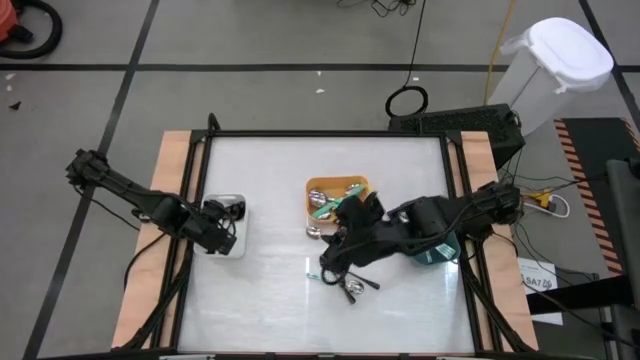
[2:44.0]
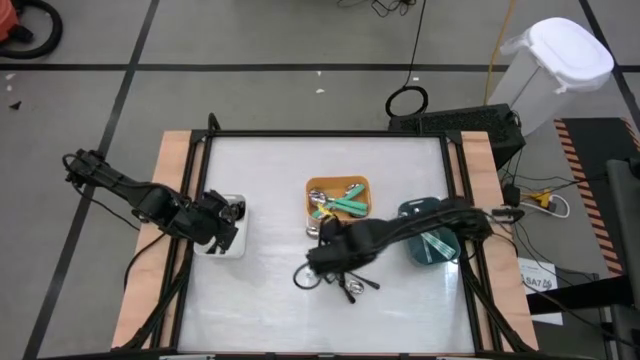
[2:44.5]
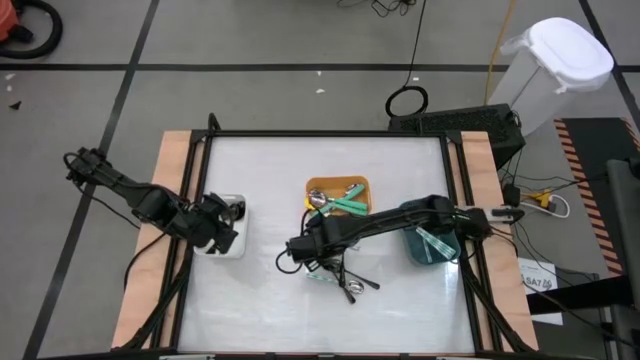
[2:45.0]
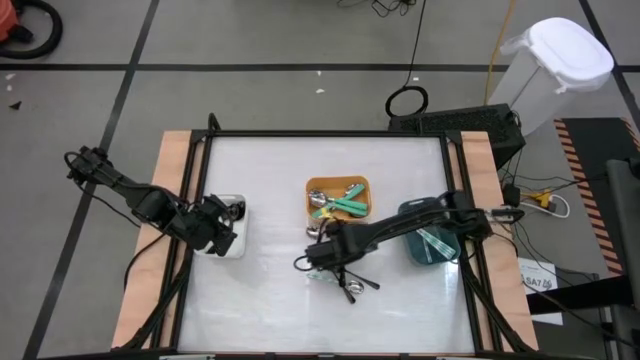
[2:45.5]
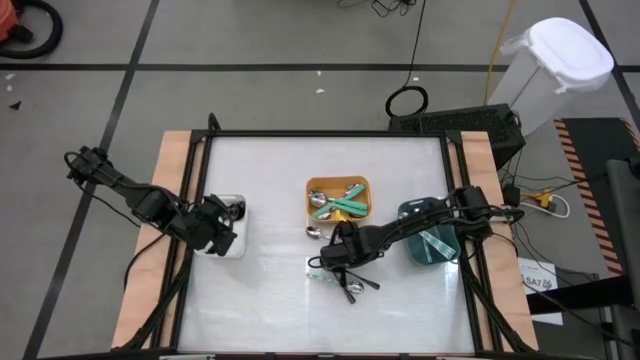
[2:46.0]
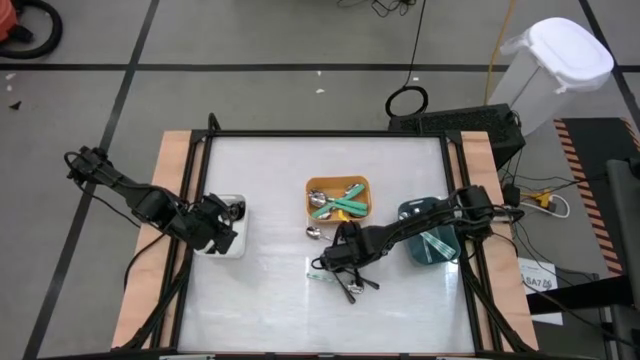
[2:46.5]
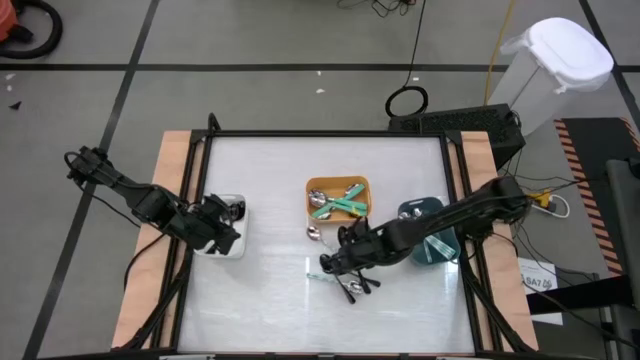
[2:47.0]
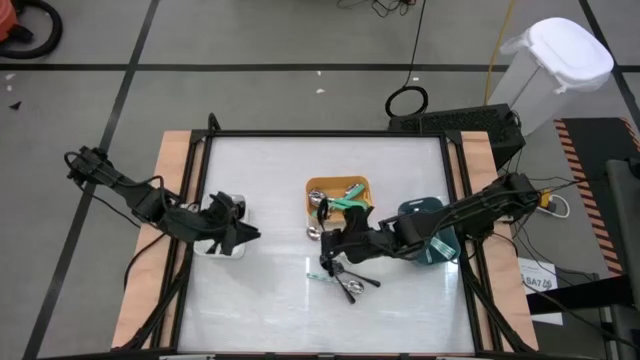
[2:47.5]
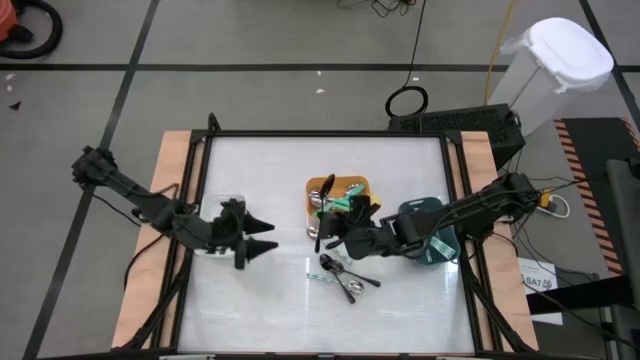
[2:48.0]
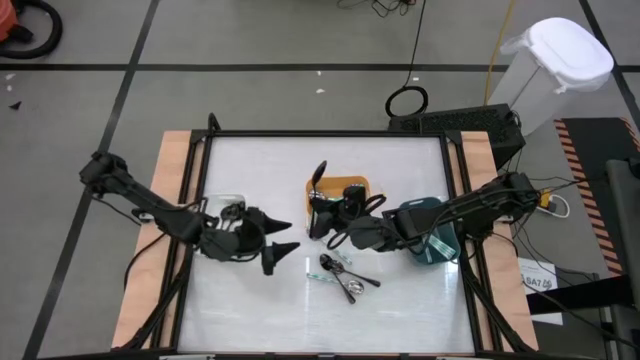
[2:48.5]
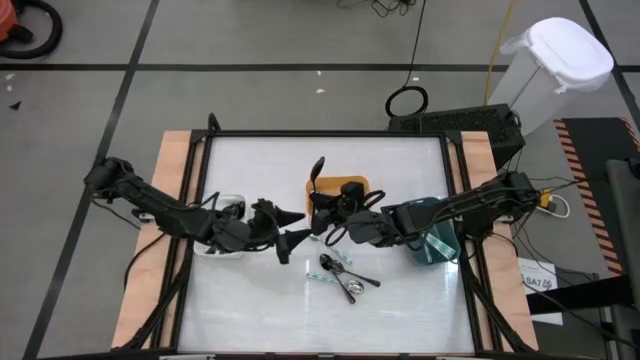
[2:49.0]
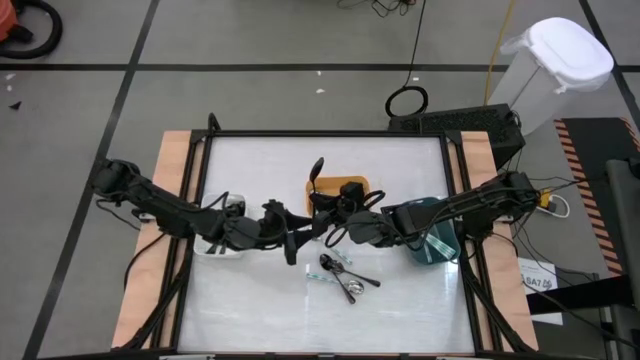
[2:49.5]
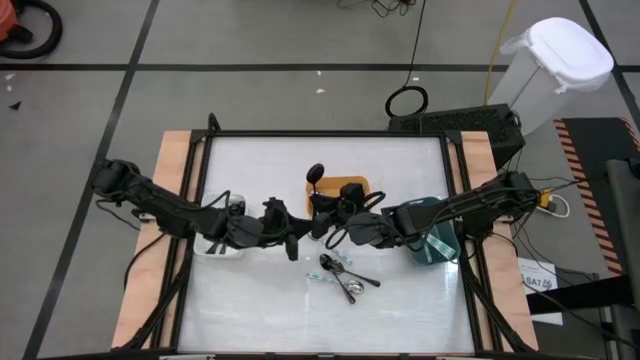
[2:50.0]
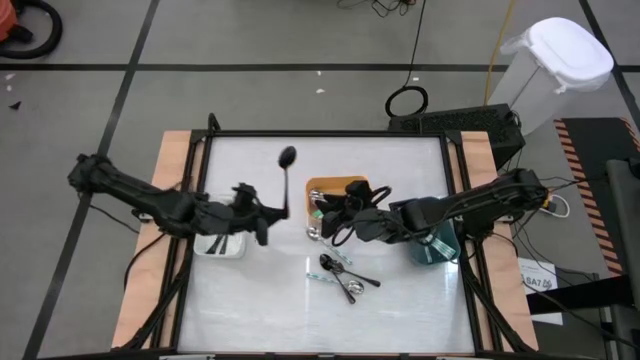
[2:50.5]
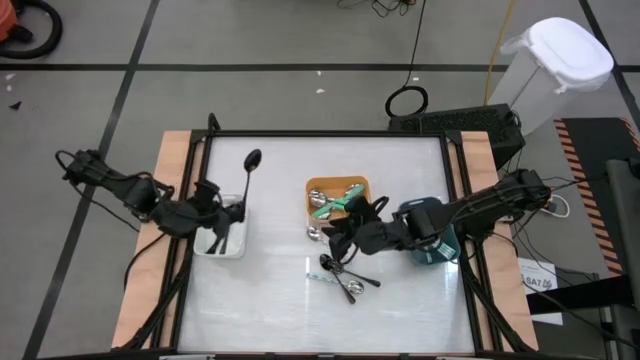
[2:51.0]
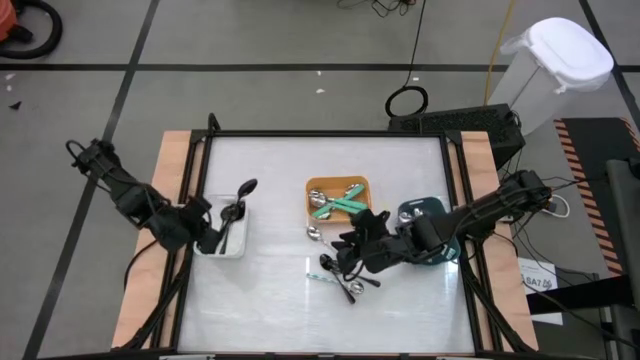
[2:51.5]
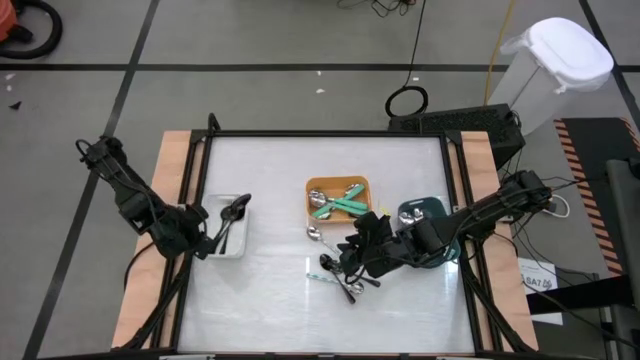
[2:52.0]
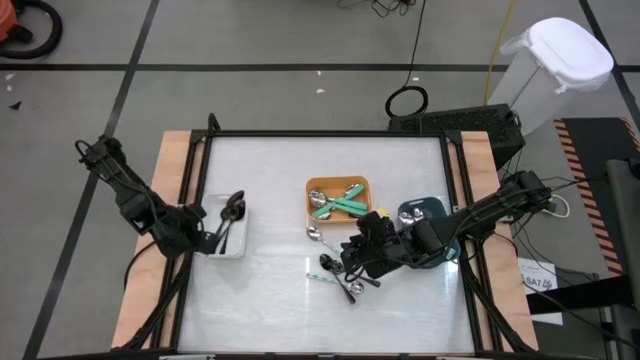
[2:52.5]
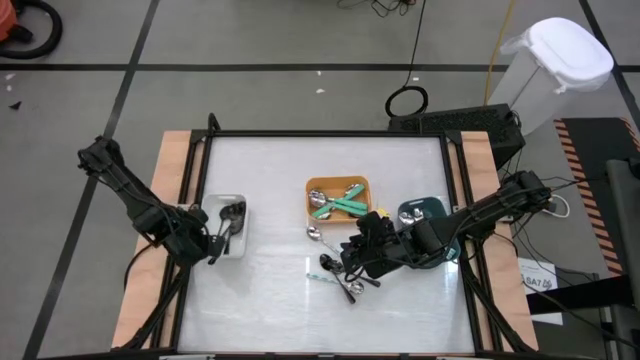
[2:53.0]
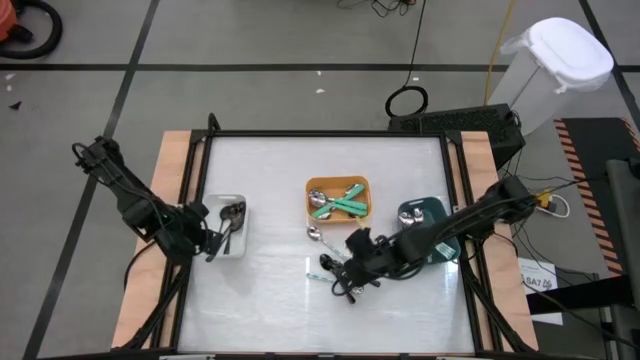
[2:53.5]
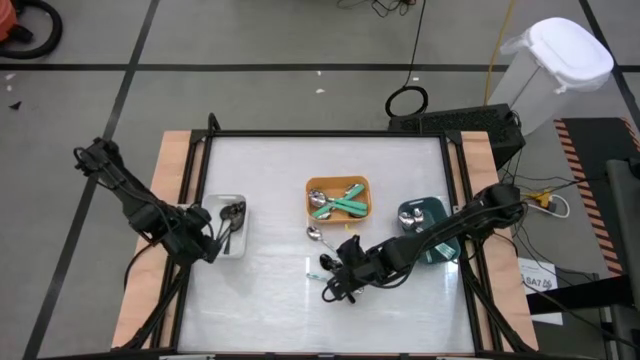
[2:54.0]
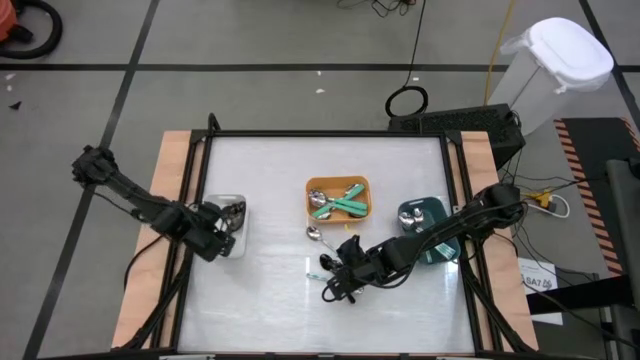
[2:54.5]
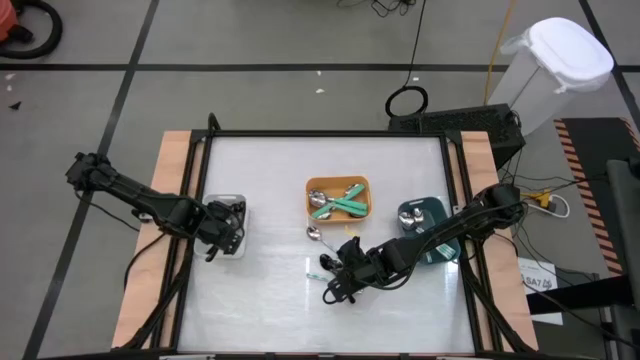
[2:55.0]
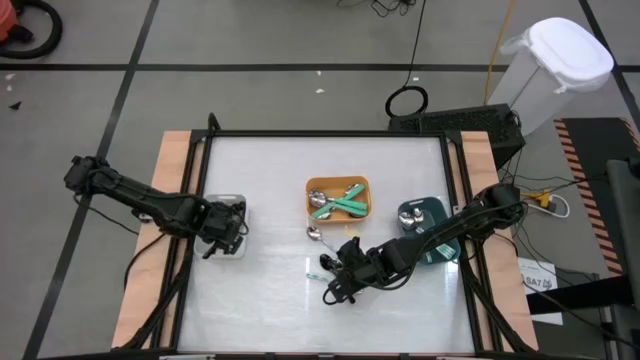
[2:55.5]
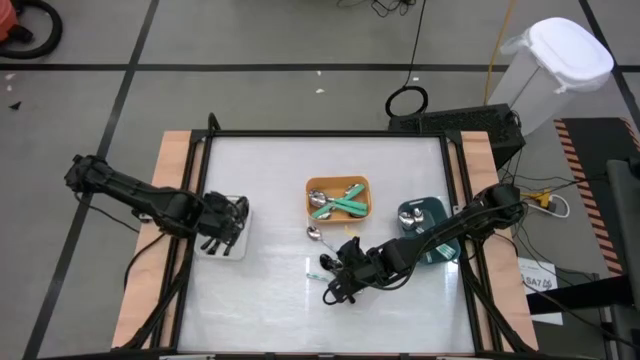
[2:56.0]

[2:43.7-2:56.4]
Task: Sort silverware by color (type)
Put the black spoon into the white bin

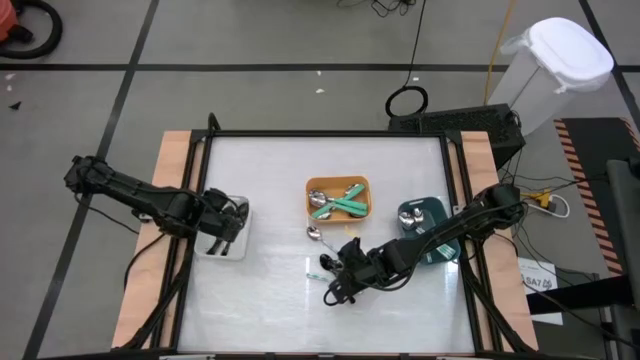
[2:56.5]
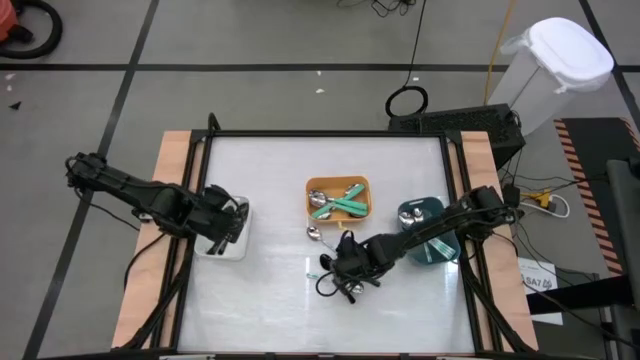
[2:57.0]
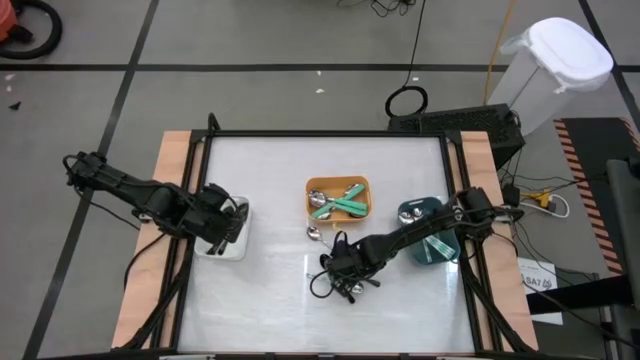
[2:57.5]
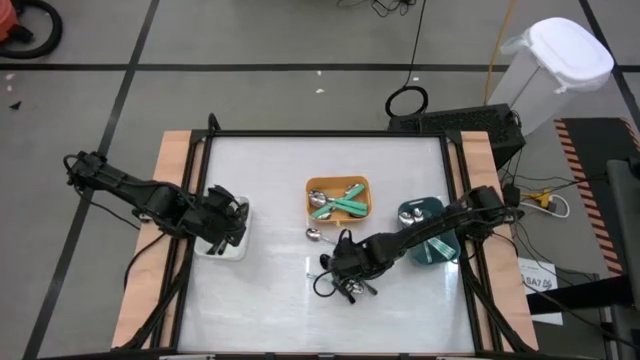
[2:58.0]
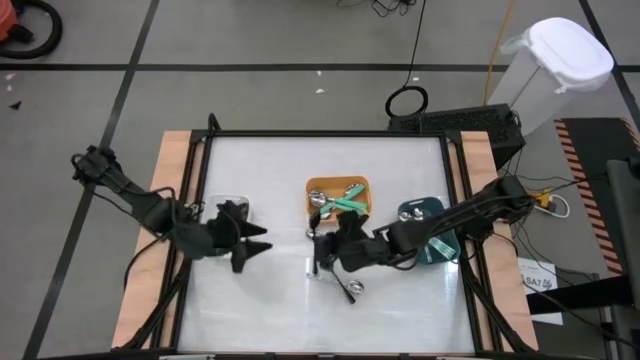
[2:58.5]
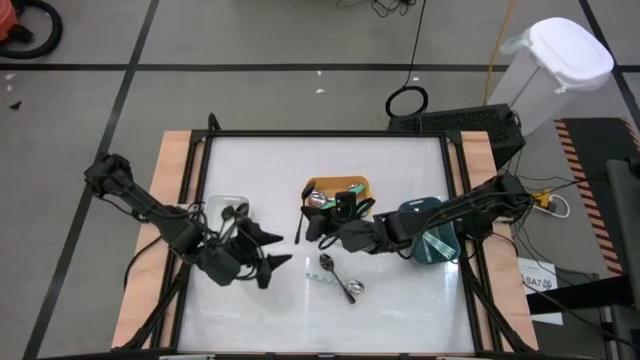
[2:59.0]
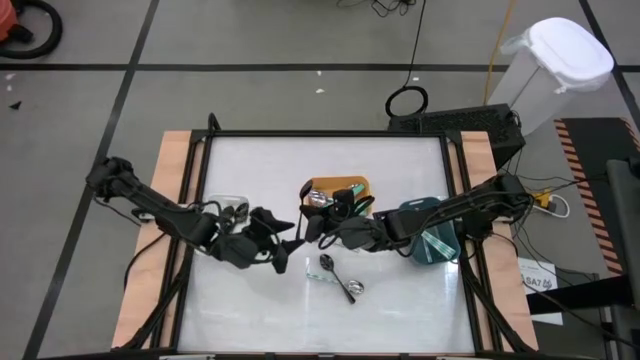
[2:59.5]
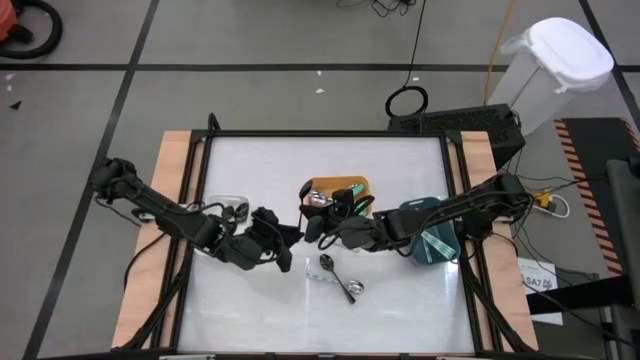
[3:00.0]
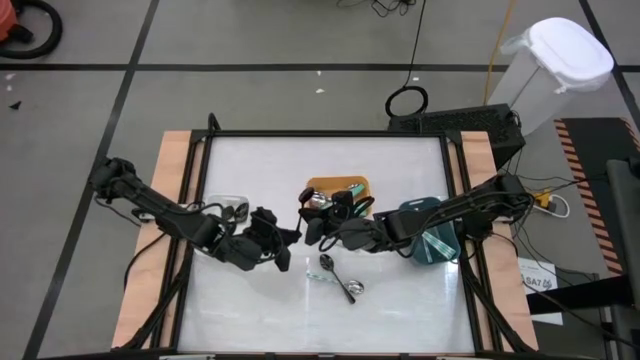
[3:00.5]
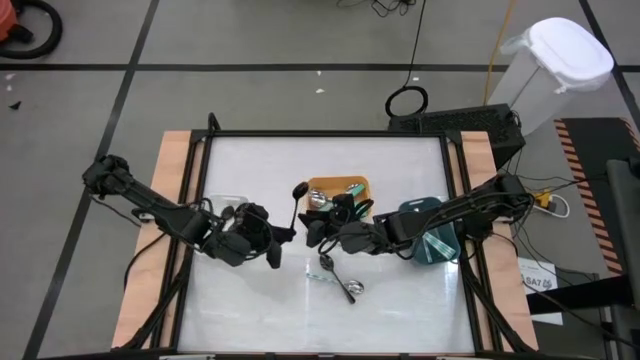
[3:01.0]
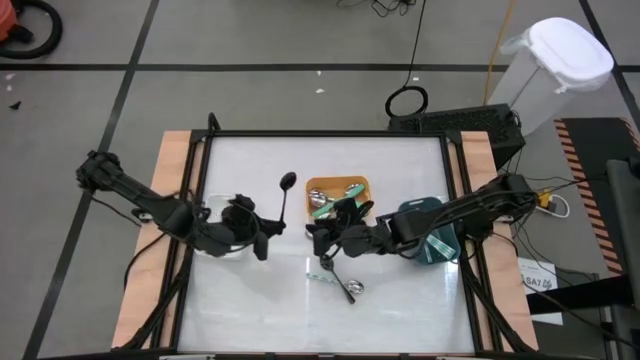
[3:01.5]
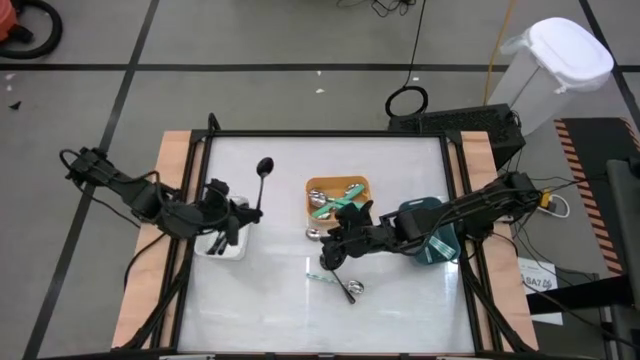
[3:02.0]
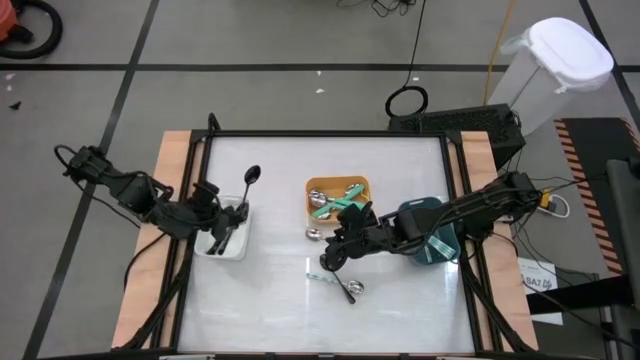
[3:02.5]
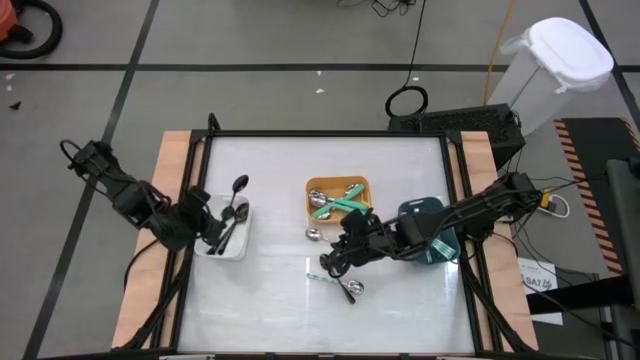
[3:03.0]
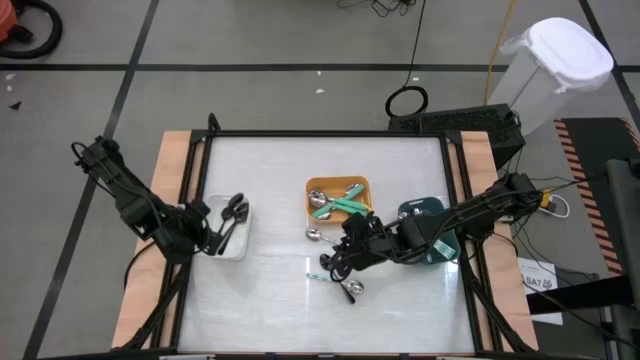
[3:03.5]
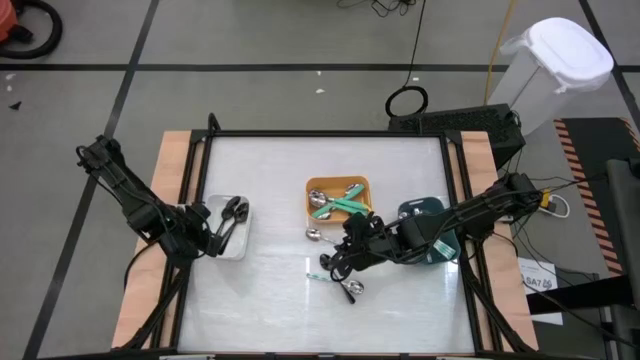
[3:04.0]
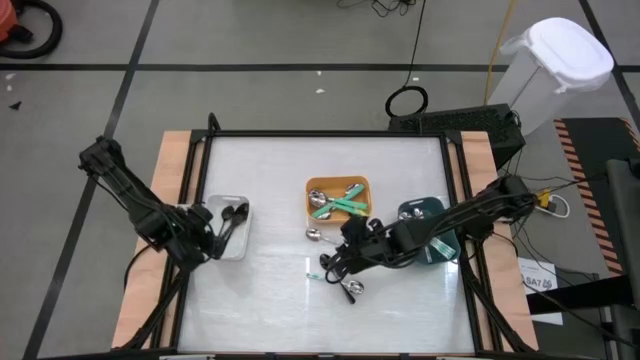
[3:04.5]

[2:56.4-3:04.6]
Put the black spoon into the white bin
